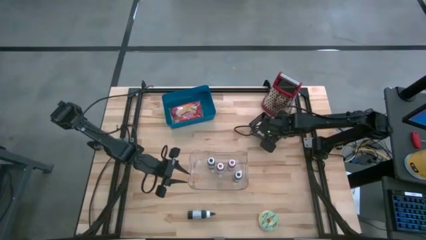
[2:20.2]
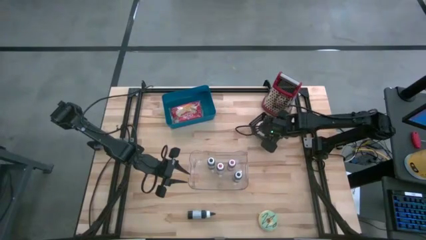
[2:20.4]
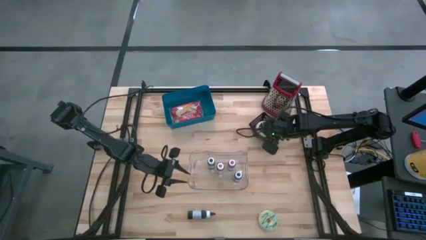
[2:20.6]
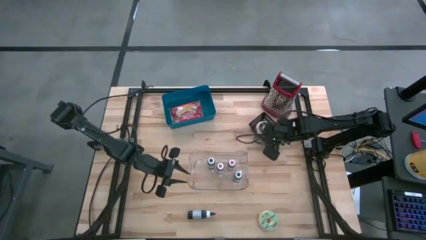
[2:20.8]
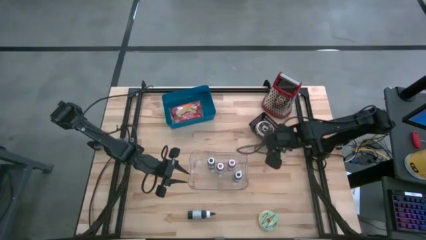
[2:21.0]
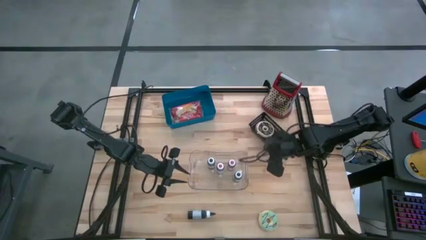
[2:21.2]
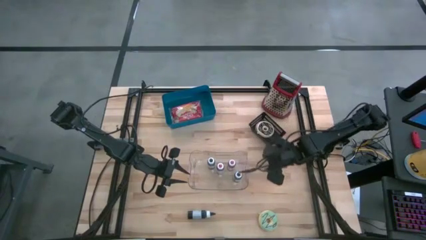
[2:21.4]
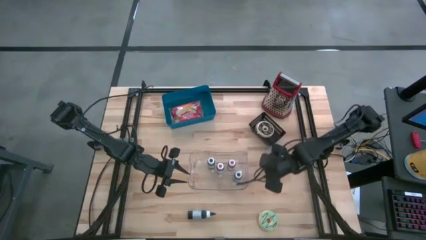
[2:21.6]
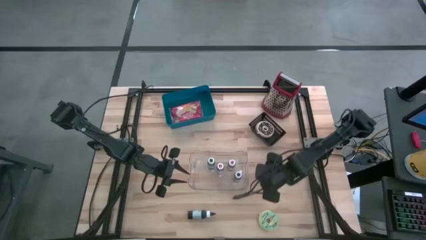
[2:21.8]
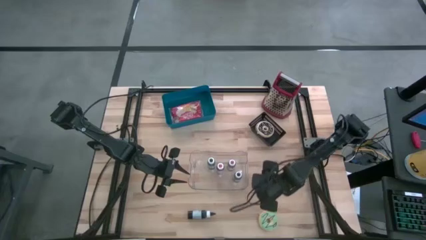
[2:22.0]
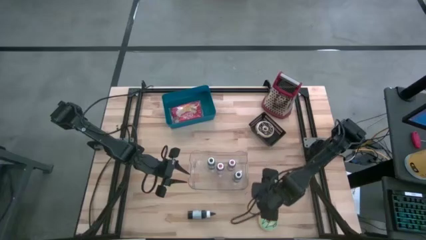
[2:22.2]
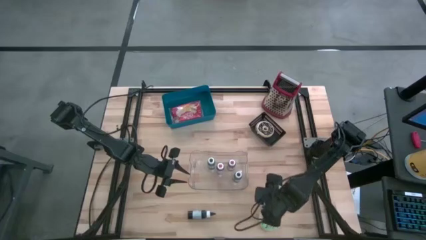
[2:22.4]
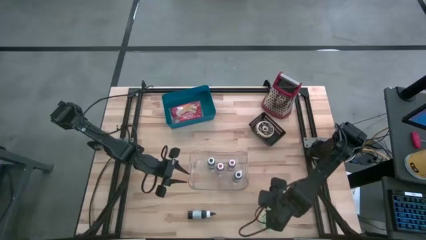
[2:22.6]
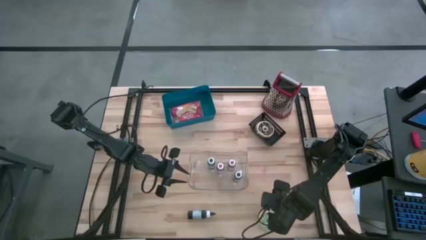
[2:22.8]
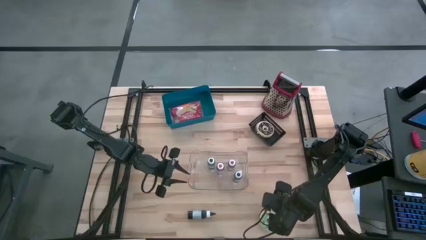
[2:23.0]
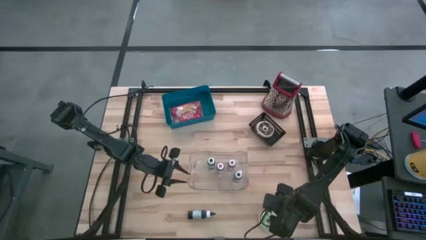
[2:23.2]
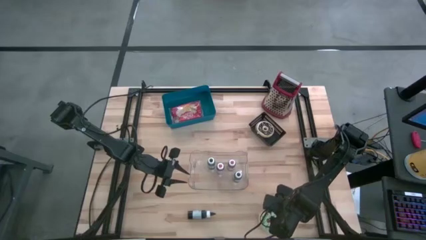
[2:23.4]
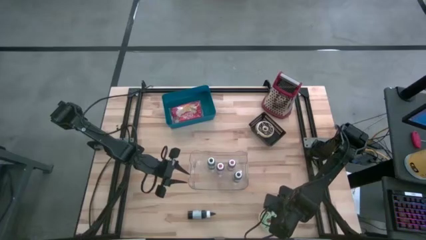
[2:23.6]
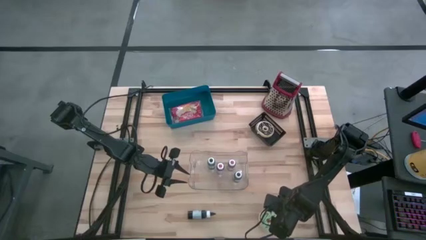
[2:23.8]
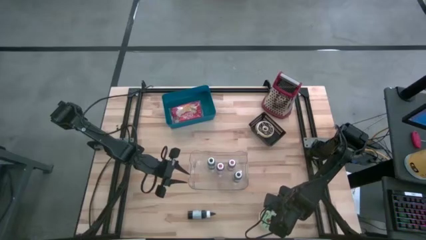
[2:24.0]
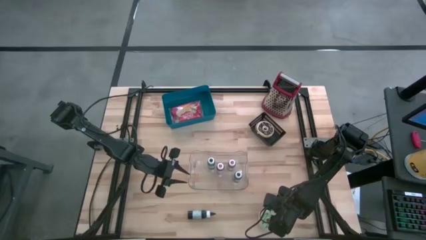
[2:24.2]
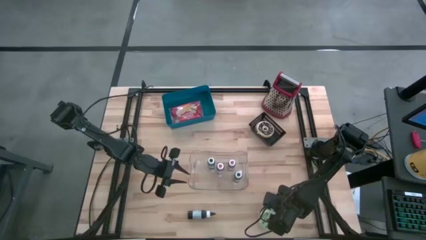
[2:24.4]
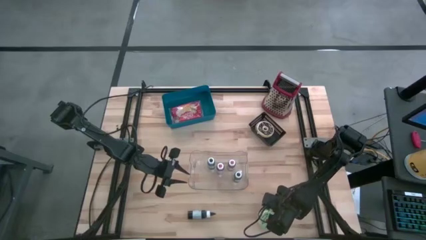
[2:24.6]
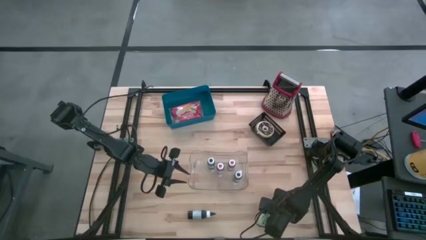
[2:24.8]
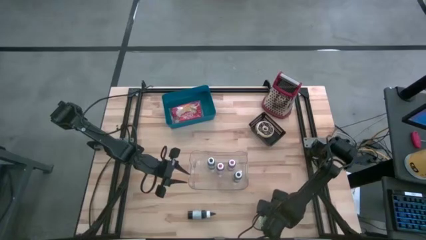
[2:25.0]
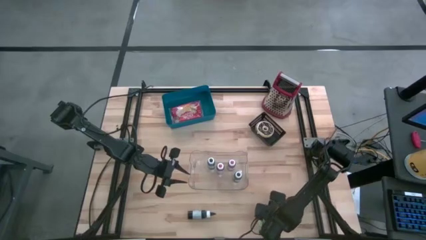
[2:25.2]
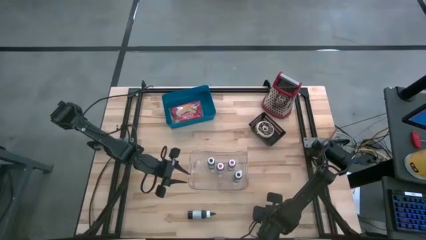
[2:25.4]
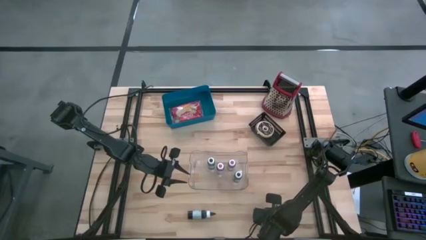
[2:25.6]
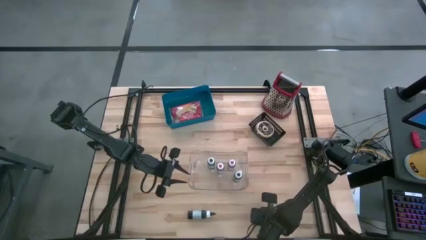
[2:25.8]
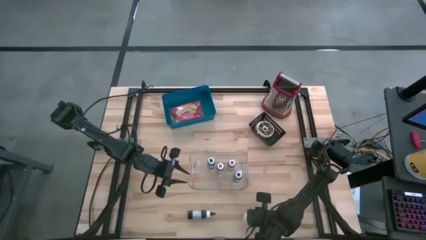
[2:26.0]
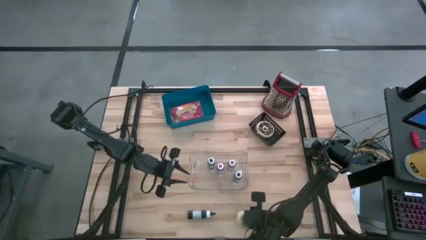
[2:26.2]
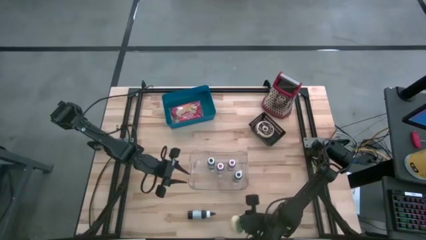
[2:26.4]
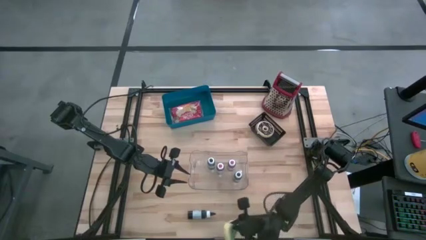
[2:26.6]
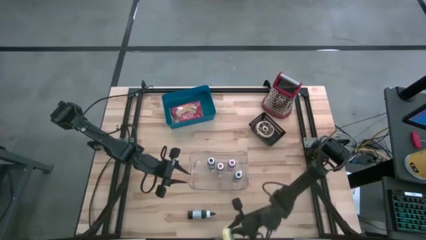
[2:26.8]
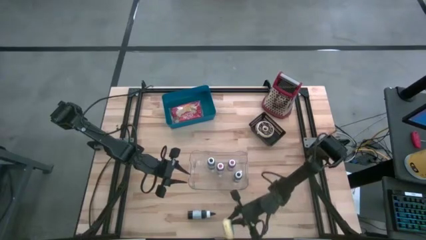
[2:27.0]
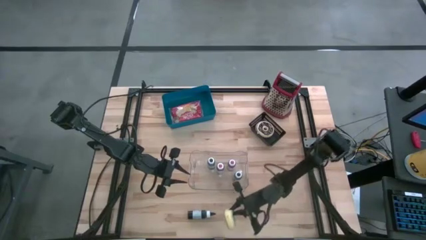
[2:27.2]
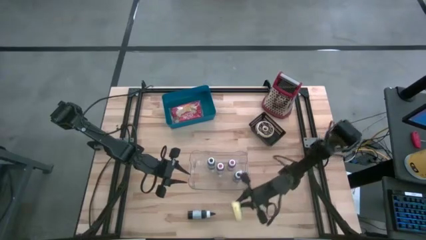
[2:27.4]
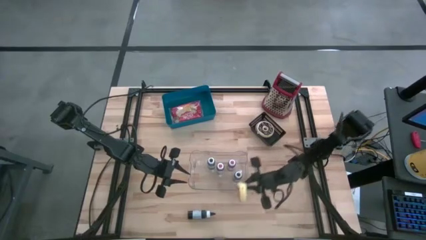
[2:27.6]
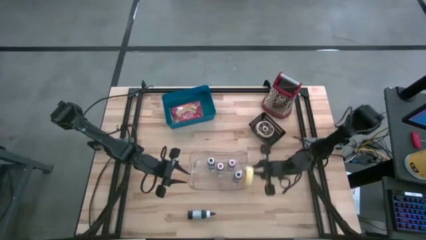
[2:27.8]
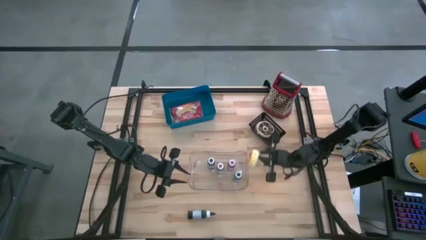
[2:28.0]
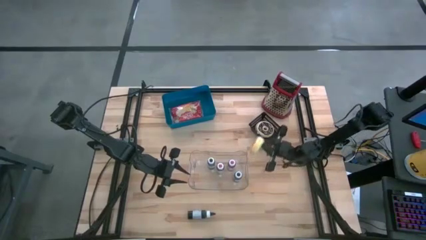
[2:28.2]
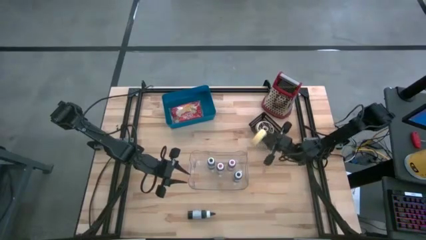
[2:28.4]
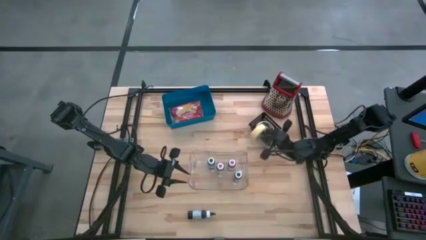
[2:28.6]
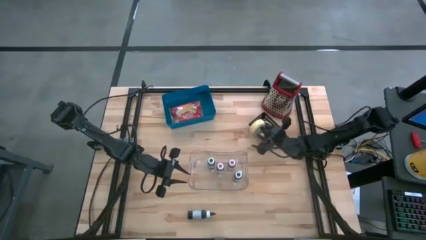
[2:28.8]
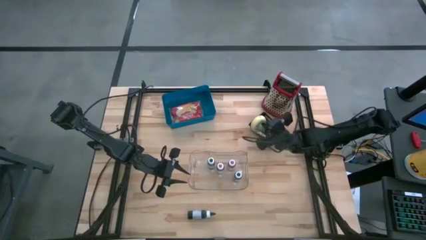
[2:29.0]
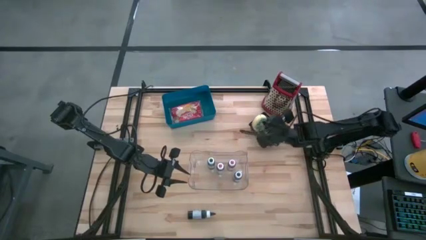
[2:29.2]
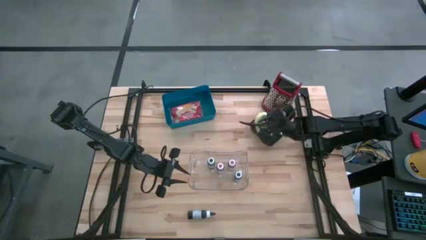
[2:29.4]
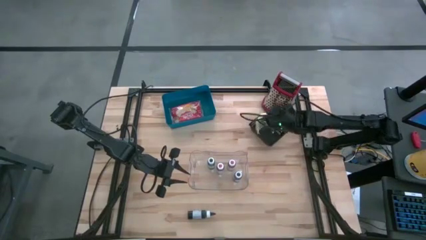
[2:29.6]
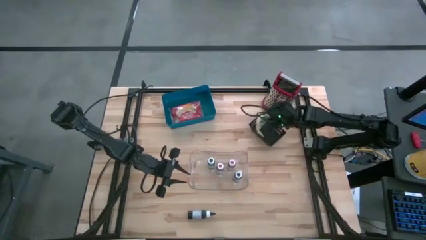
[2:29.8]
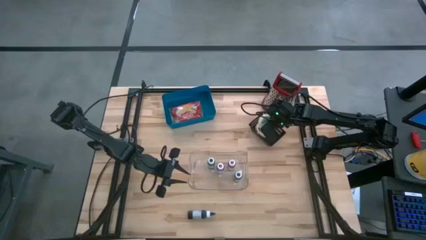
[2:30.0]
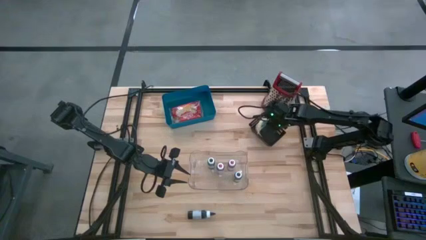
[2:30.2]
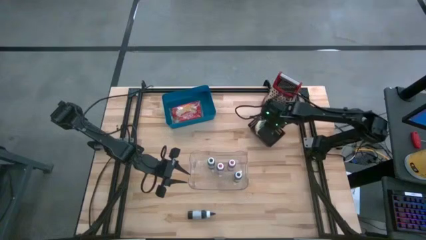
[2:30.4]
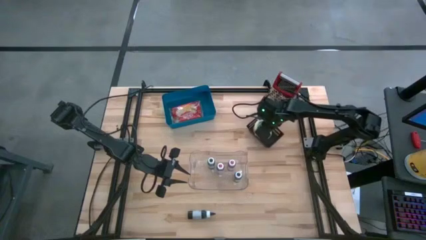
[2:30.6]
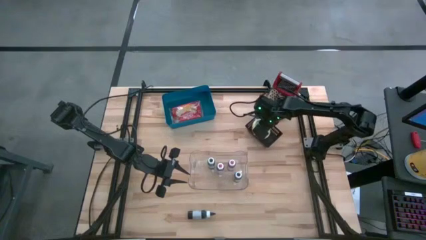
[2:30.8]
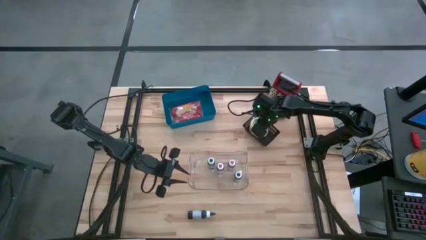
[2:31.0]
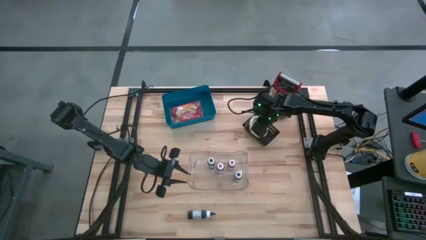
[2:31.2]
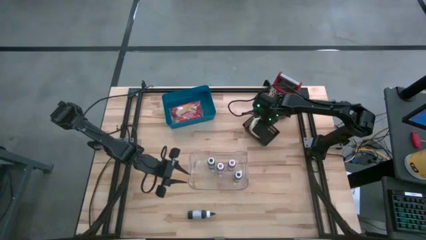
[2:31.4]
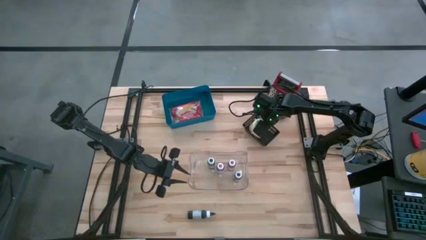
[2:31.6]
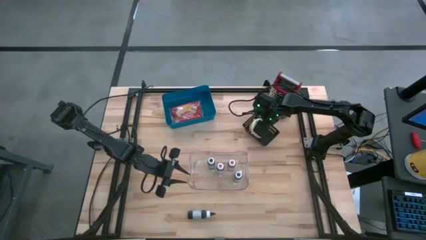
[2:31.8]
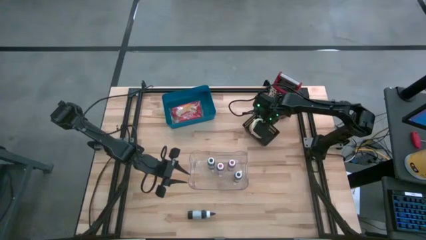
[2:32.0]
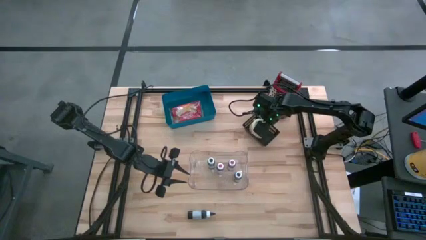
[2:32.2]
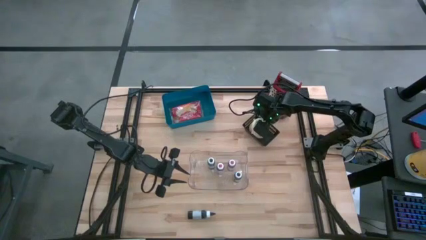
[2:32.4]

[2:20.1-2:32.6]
Put the green donut into the black bin
